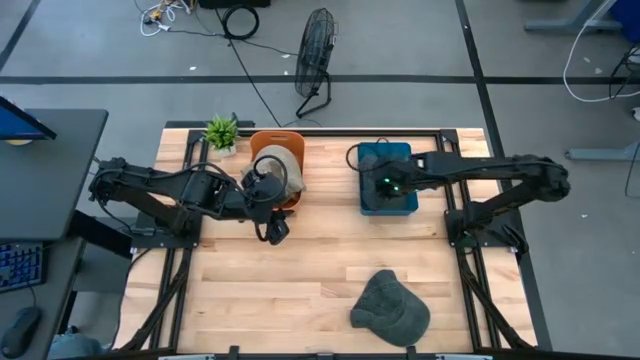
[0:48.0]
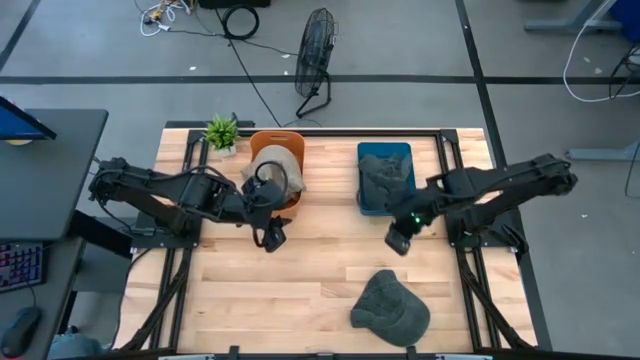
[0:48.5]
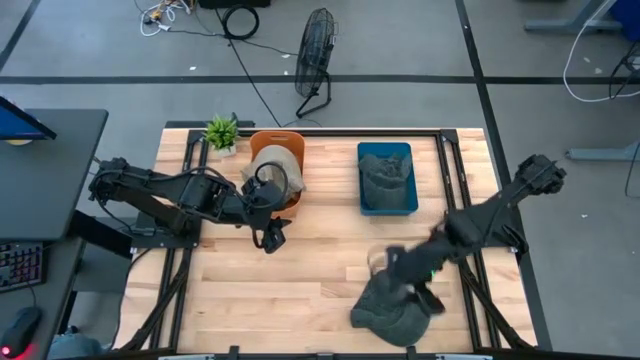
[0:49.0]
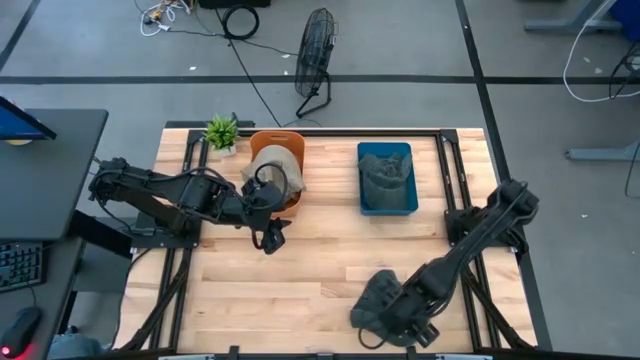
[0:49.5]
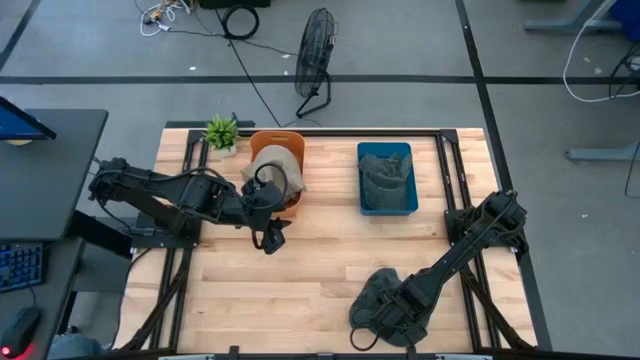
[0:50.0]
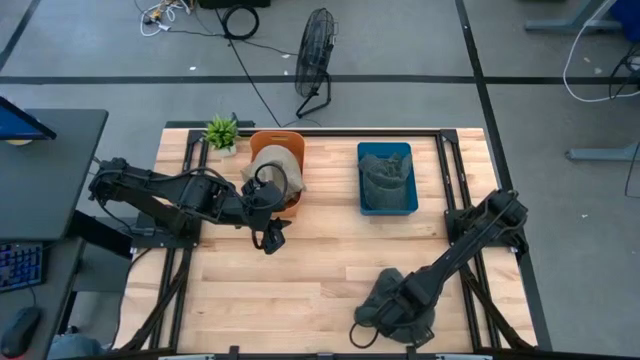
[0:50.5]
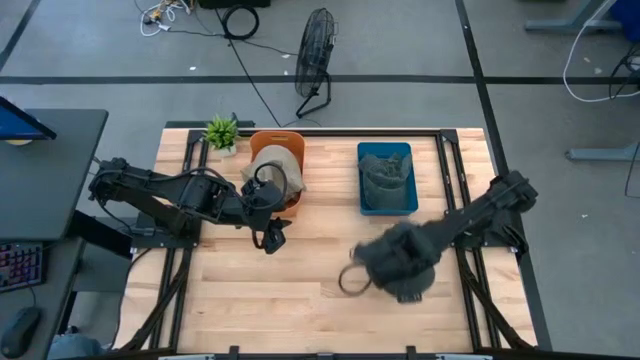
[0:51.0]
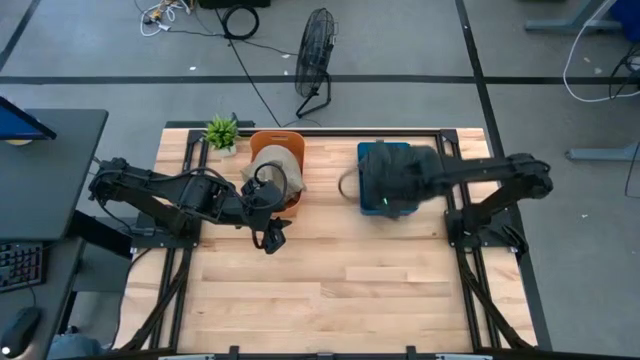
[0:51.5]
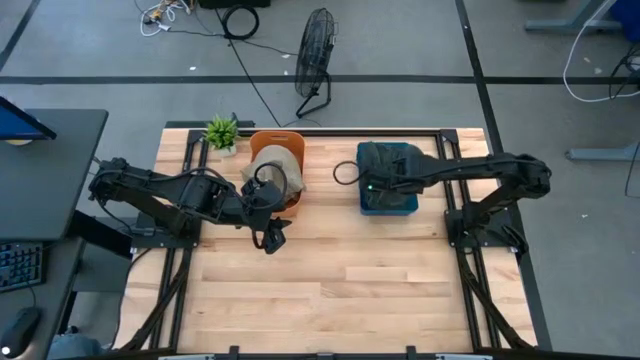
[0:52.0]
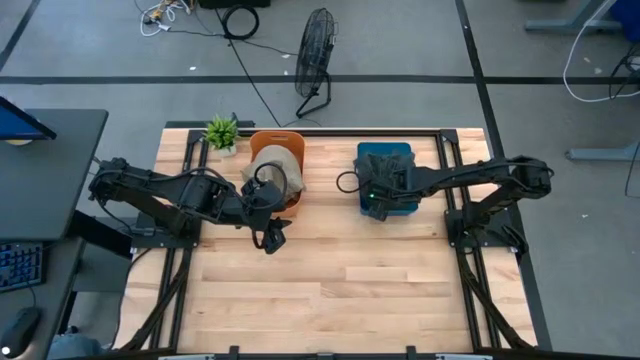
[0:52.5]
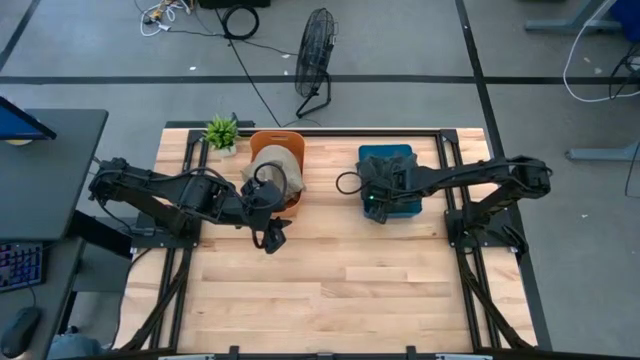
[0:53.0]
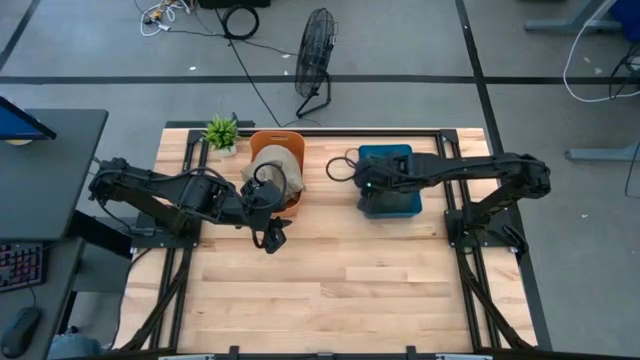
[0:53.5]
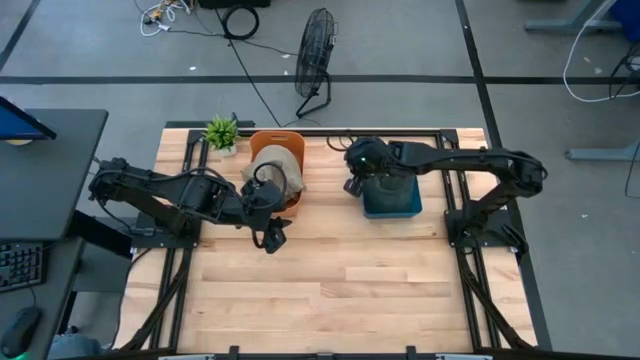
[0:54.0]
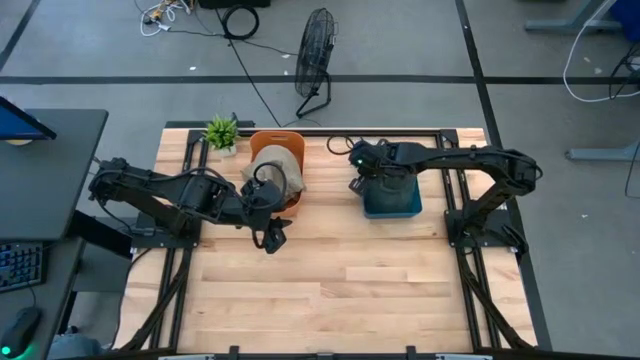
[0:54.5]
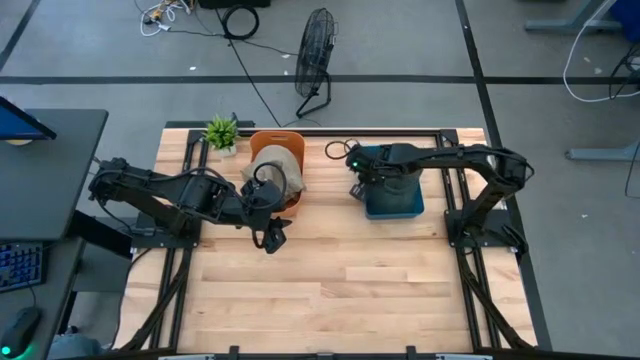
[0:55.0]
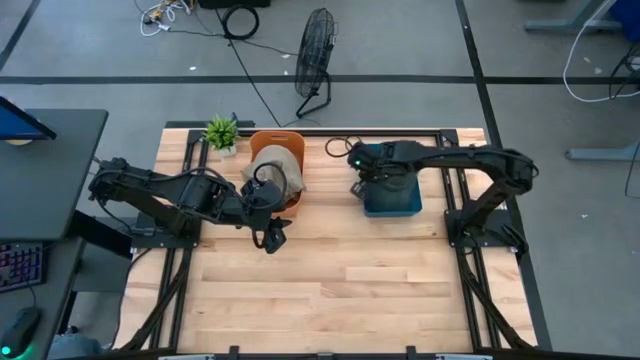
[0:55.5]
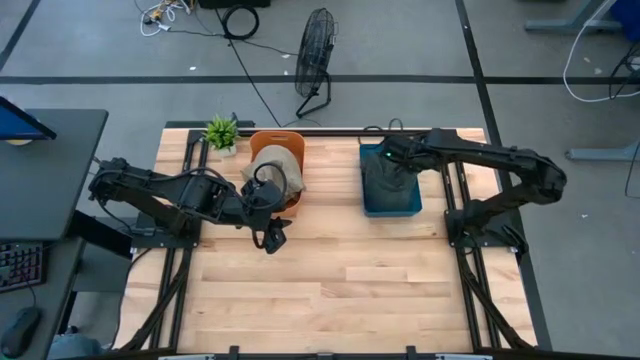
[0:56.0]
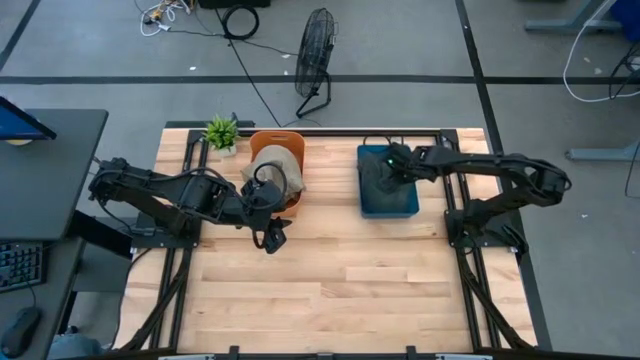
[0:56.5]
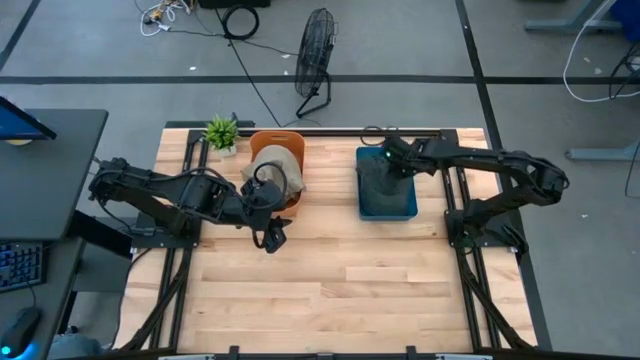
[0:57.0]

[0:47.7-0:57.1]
Task: Pick & Place hat
Put the black cap into the blue bin

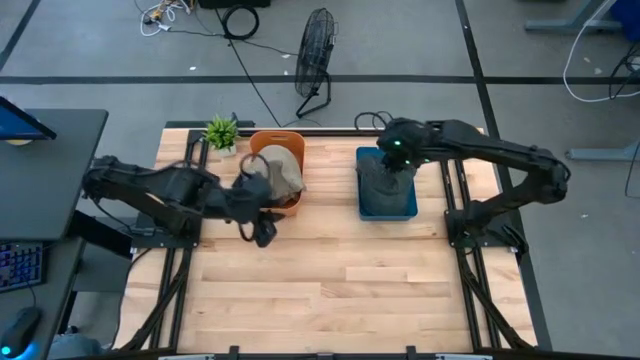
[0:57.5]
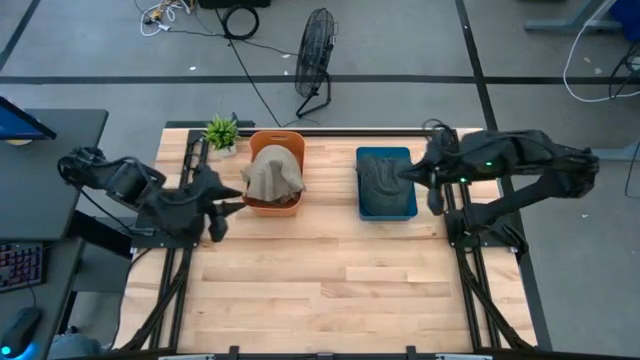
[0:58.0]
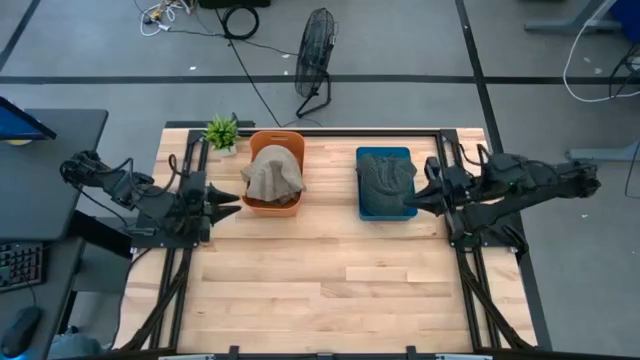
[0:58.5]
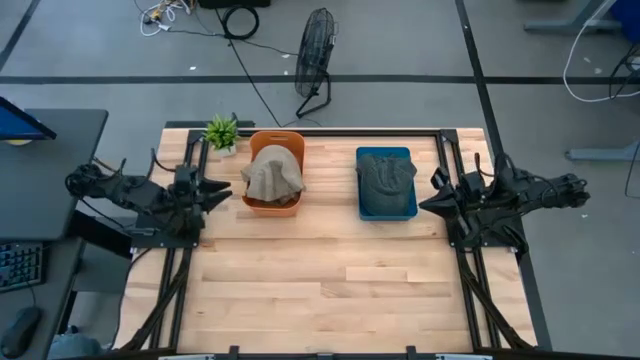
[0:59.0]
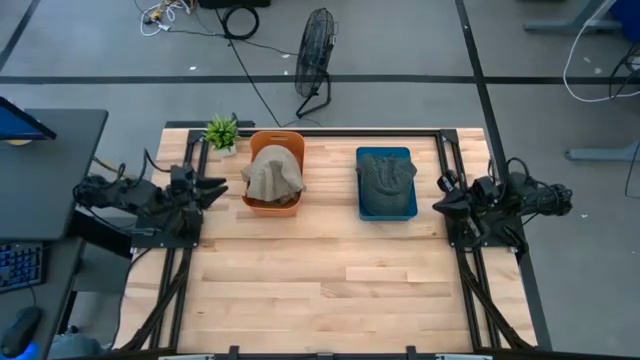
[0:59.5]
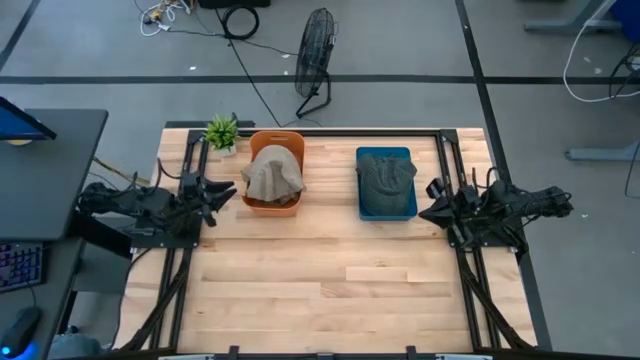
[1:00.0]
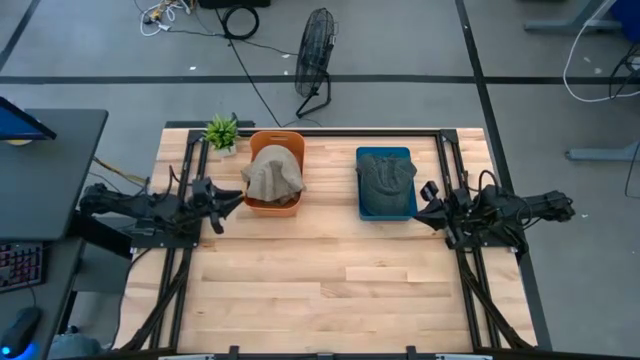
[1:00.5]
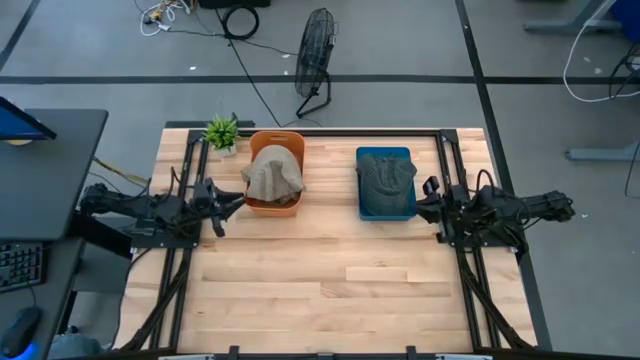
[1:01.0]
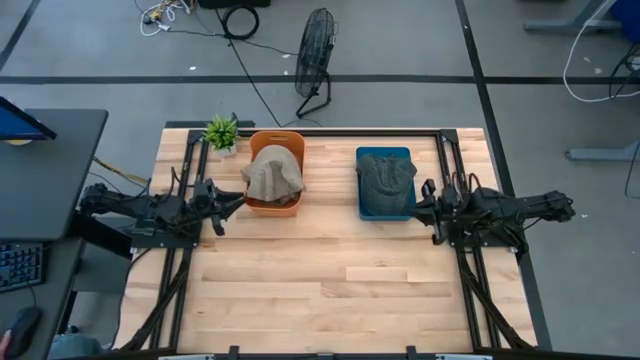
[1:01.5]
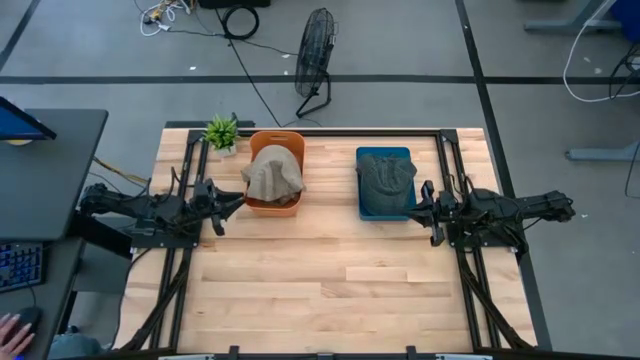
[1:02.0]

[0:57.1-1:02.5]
Return to Home Position

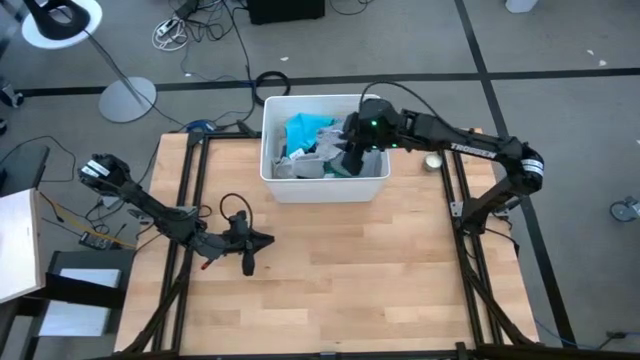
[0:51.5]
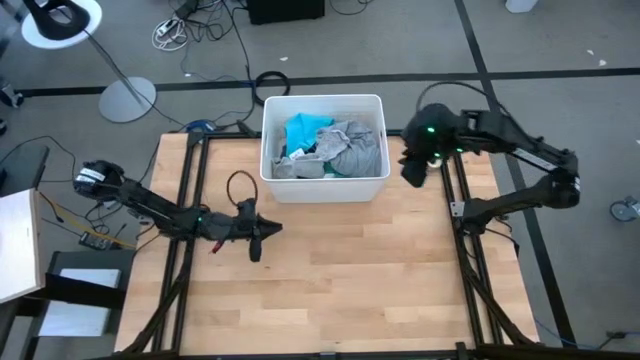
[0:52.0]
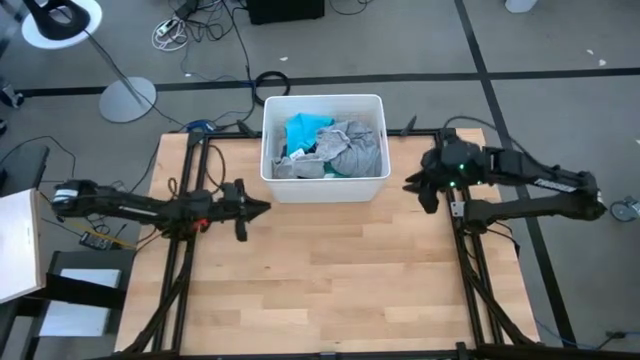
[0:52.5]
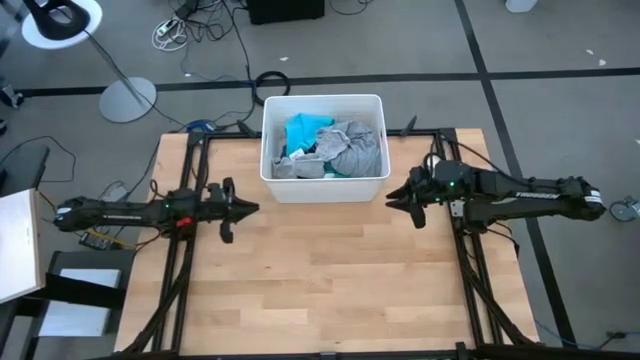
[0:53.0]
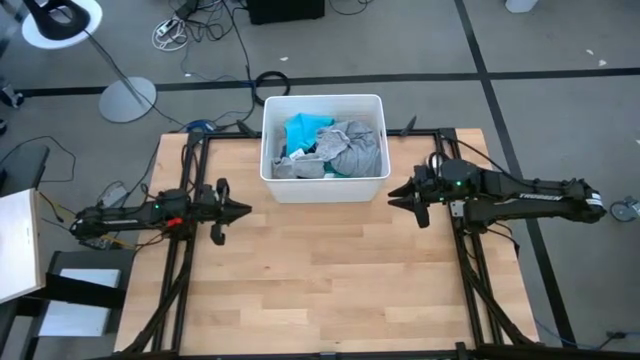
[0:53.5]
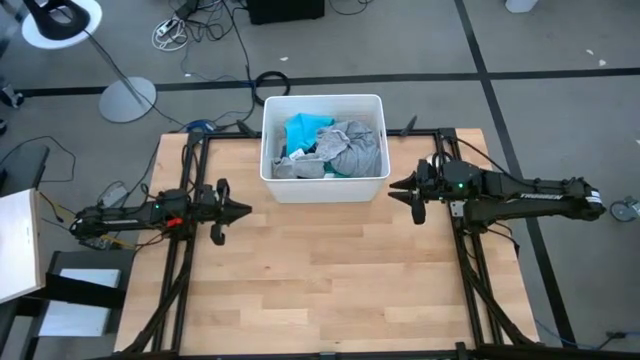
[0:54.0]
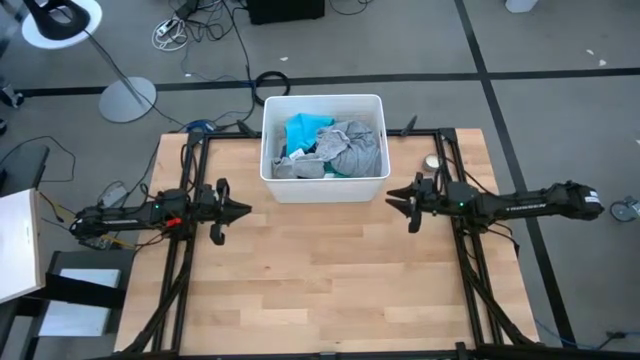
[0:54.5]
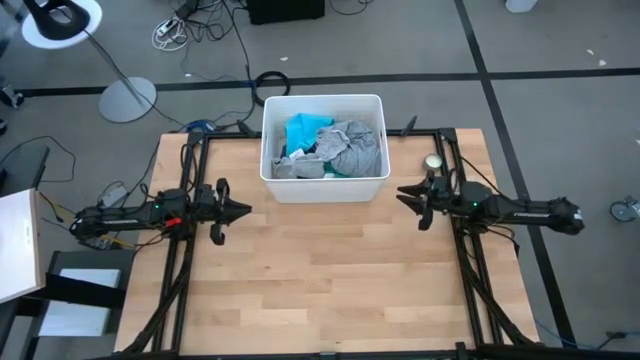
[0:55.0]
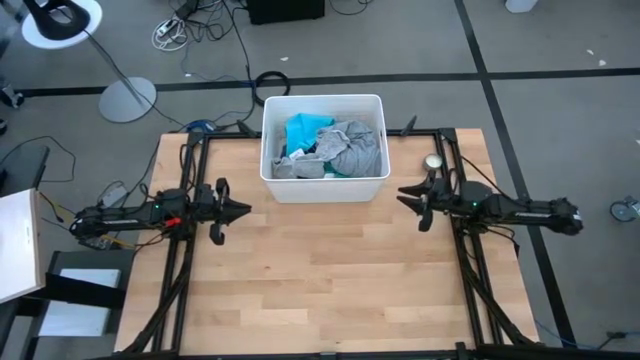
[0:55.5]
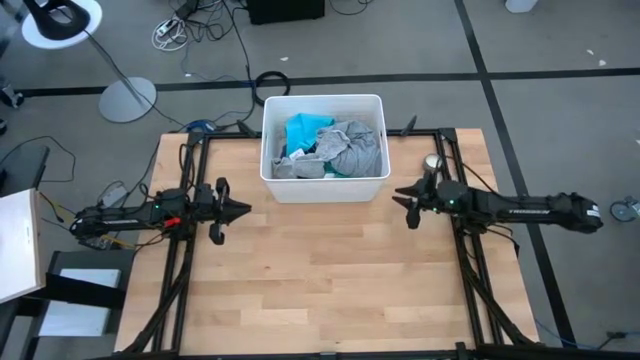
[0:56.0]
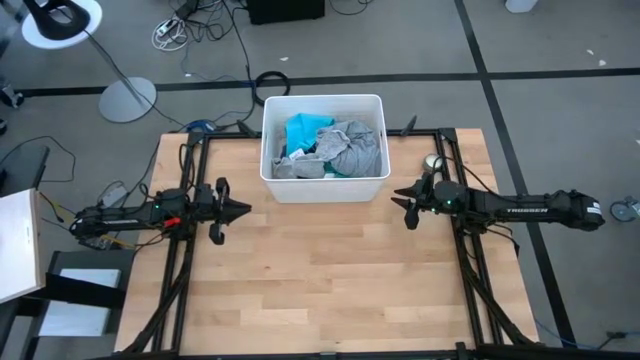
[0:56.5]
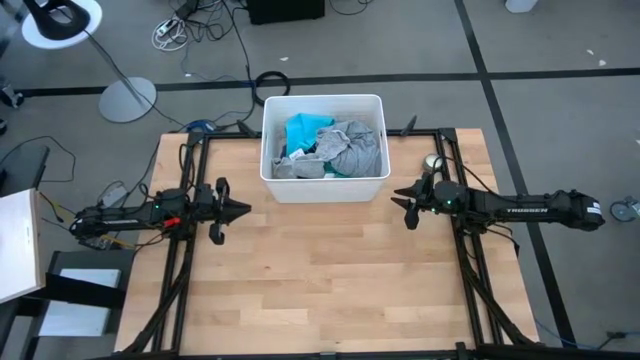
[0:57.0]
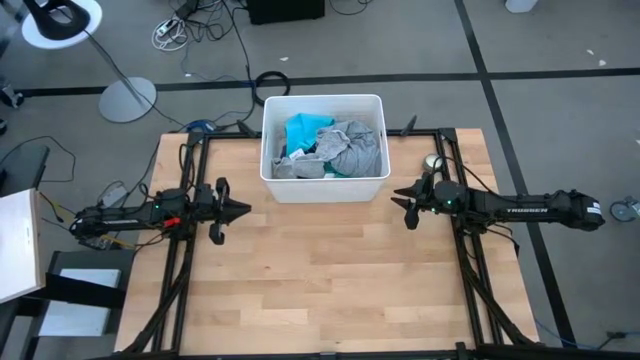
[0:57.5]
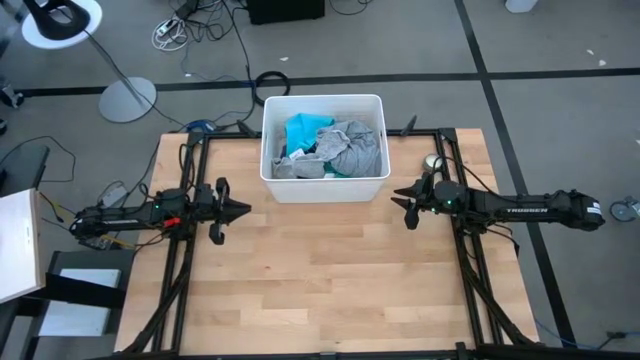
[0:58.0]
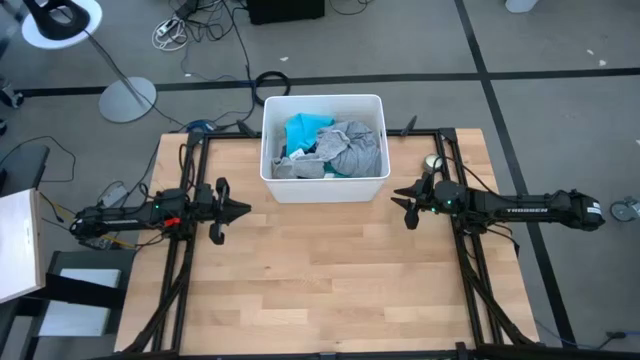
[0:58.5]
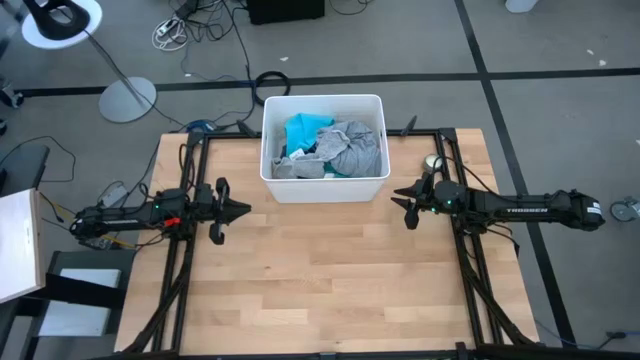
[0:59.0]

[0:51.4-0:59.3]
Task: Sort clothes
Return to Home Position
